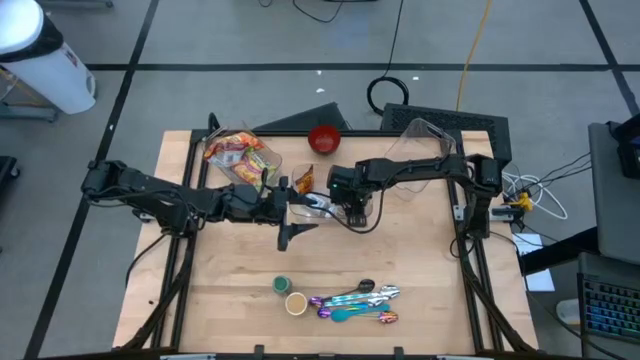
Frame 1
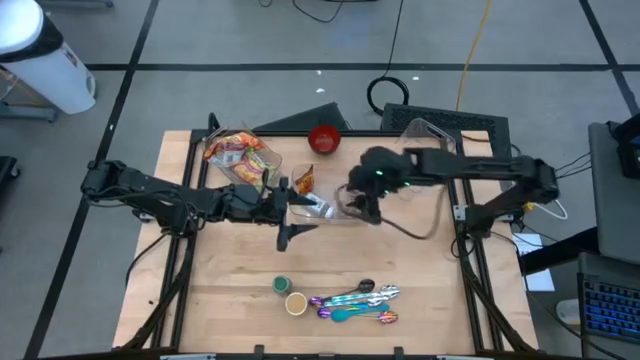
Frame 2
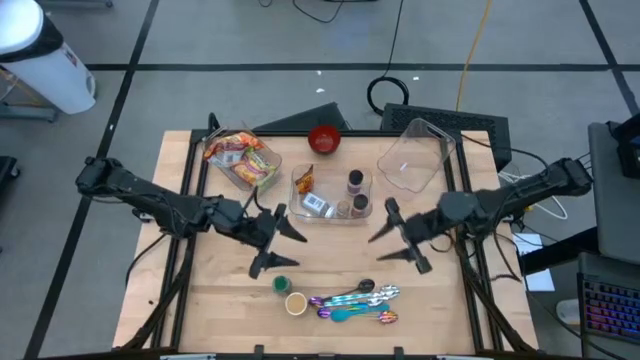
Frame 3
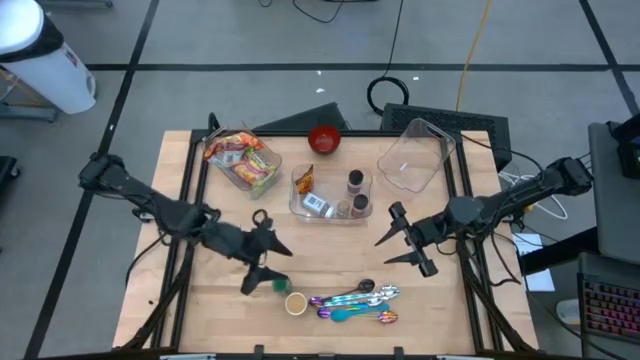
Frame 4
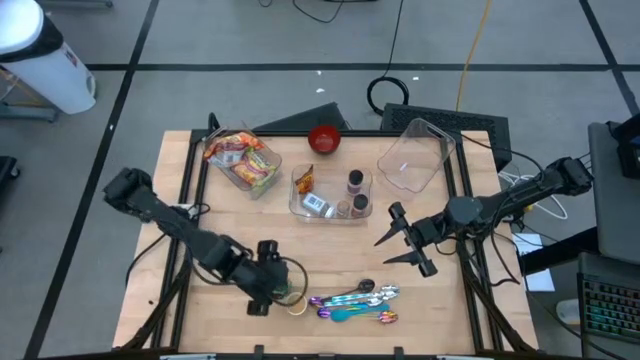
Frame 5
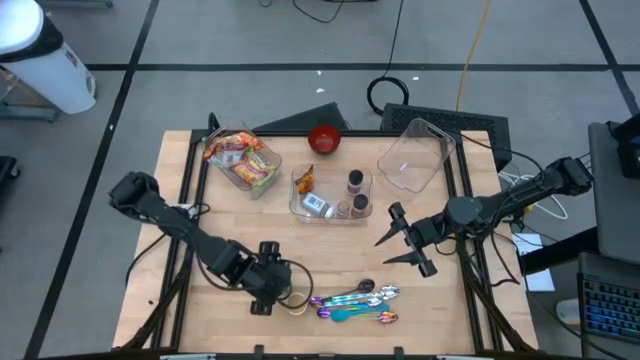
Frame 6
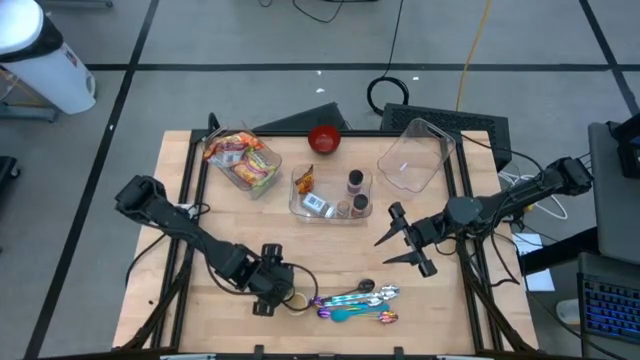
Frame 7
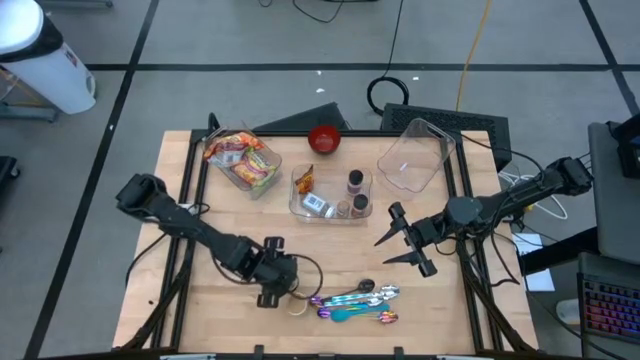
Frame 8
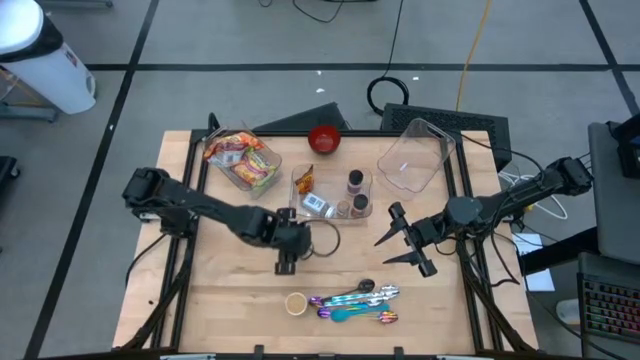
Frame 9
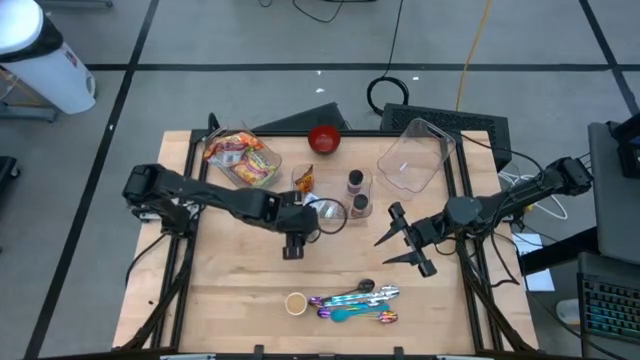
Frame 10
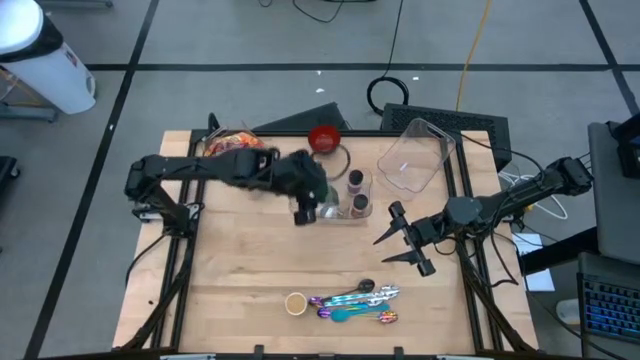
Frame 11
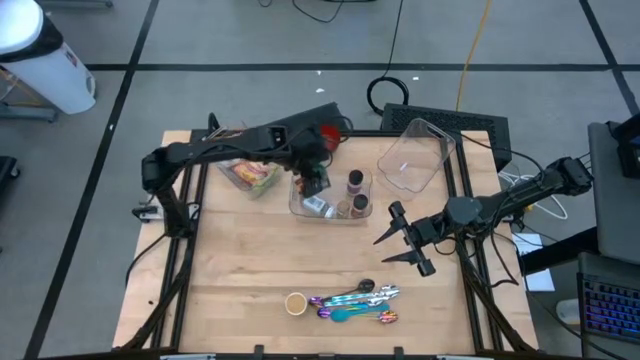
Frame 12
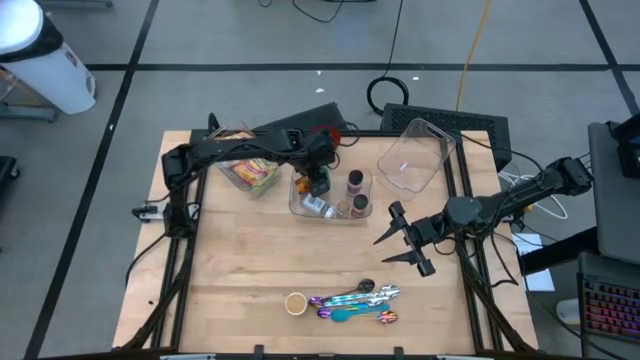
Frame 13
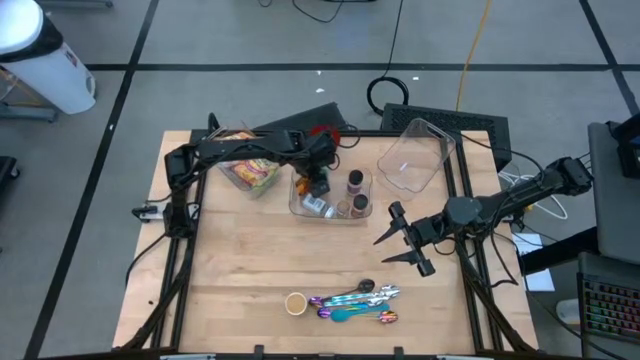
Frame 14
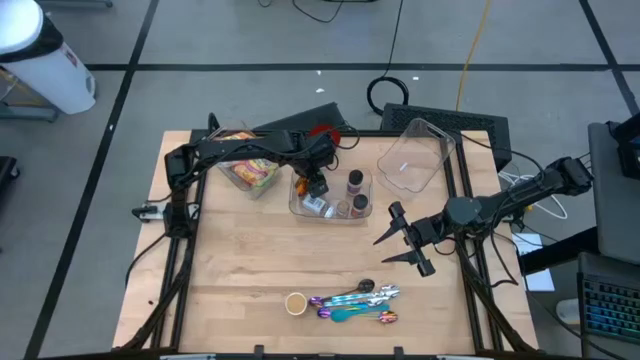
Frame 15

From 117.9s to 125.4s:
Task: Pick & Place Food Item
Put the green seasoning bottle into the center transparent bin

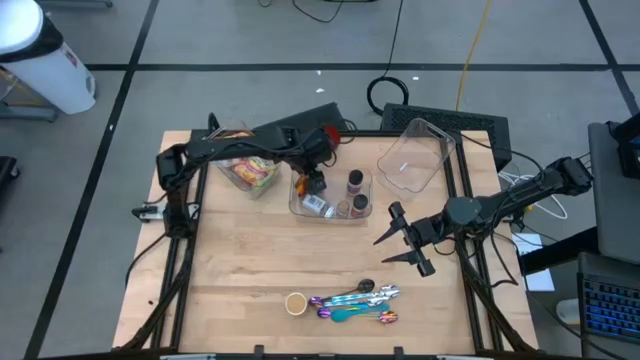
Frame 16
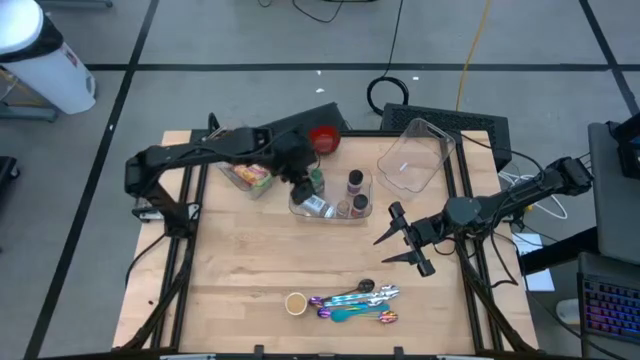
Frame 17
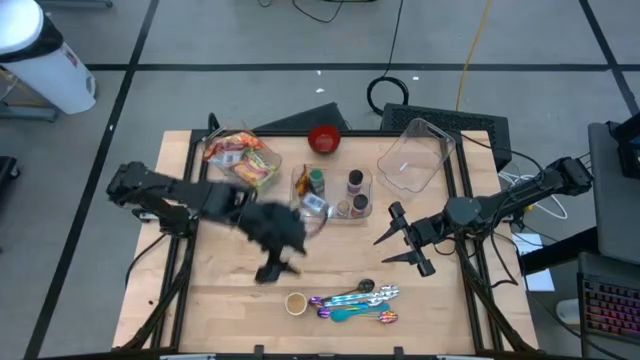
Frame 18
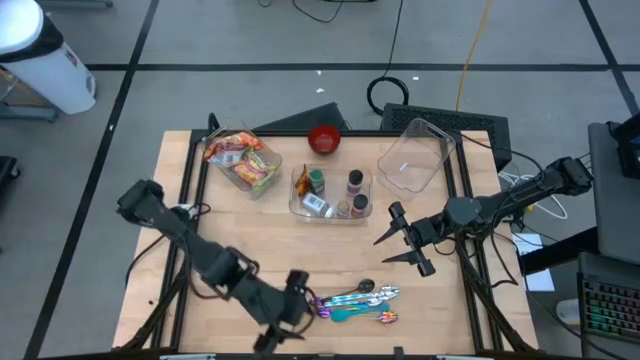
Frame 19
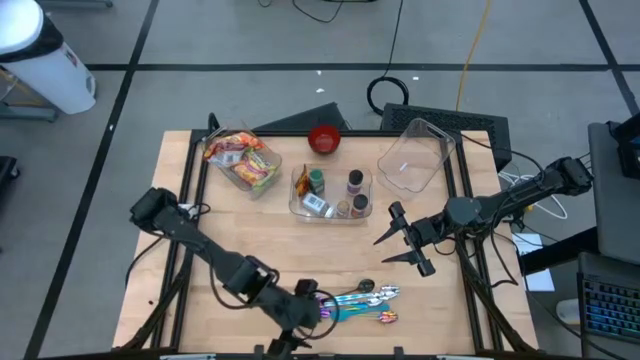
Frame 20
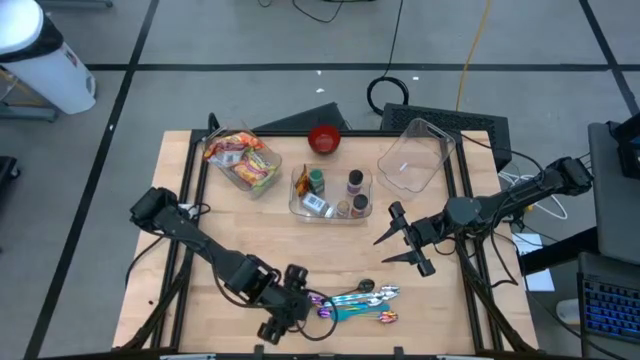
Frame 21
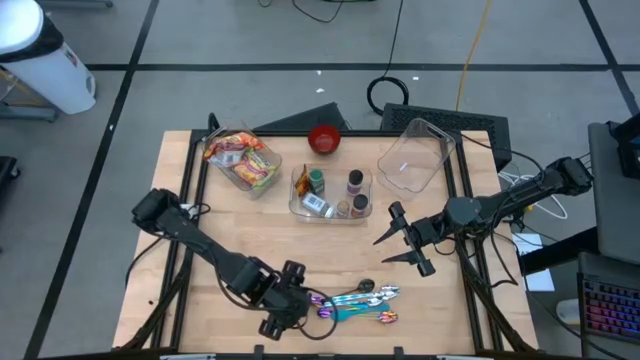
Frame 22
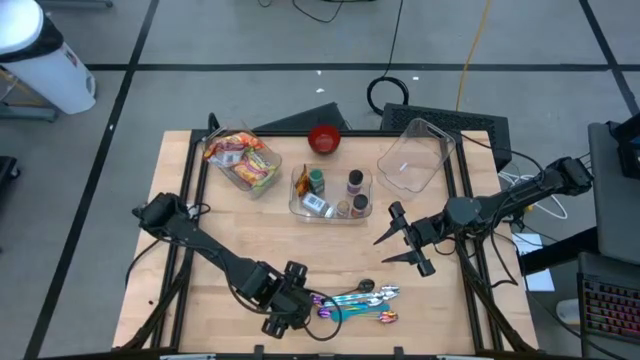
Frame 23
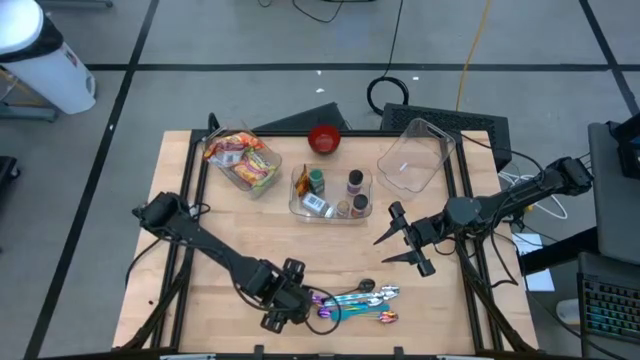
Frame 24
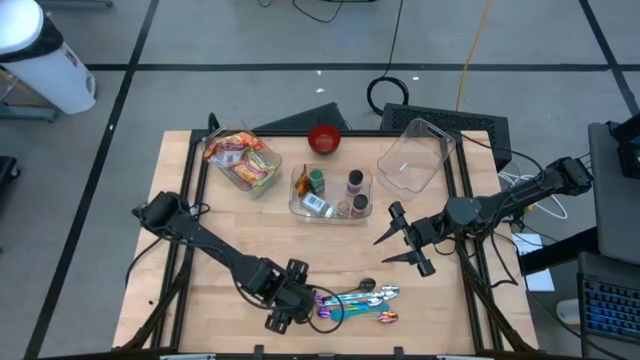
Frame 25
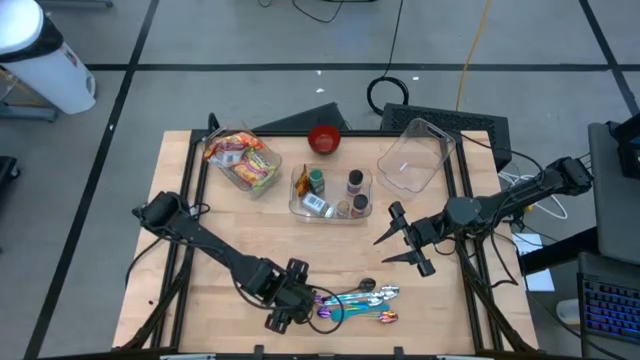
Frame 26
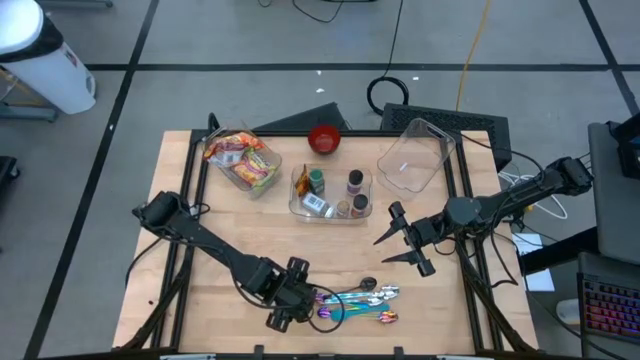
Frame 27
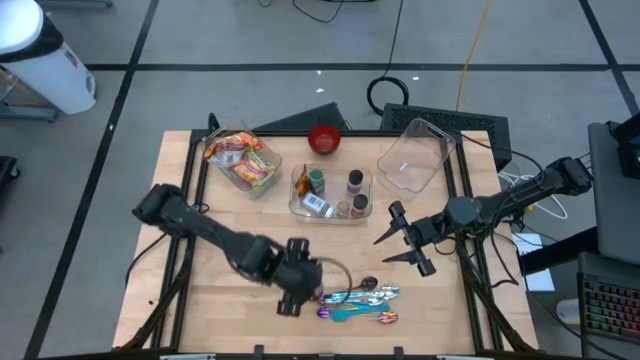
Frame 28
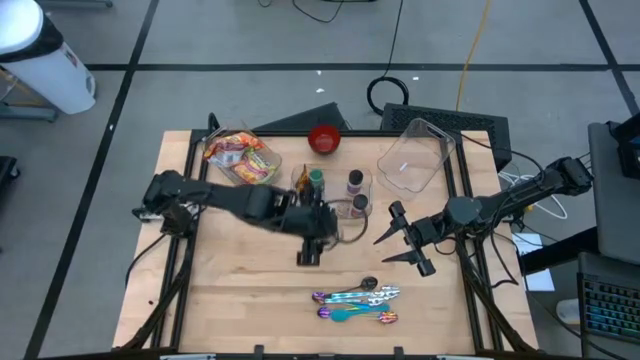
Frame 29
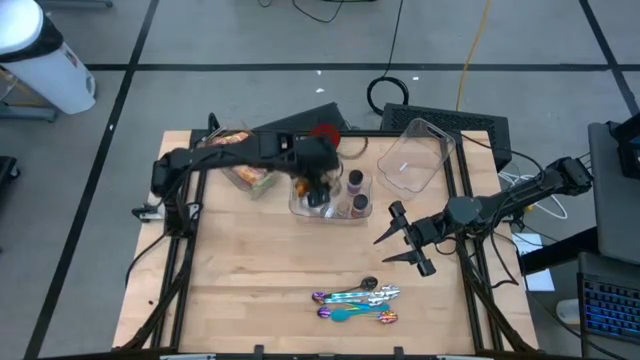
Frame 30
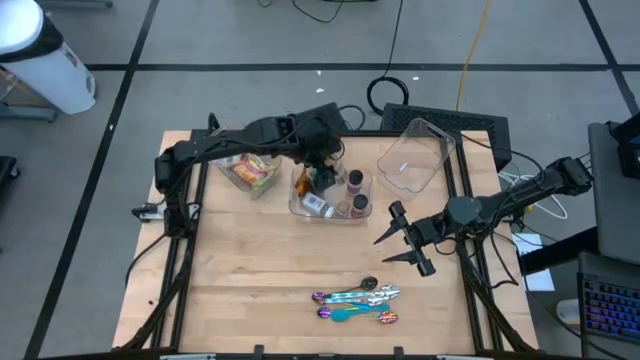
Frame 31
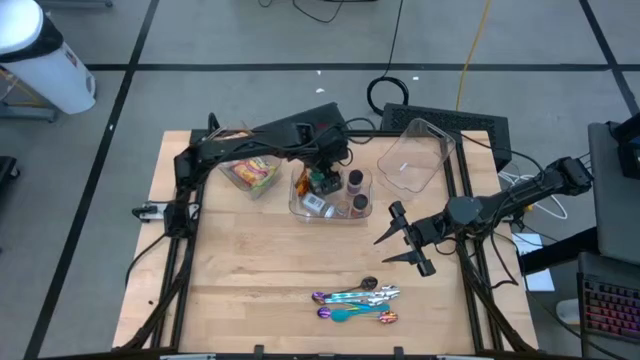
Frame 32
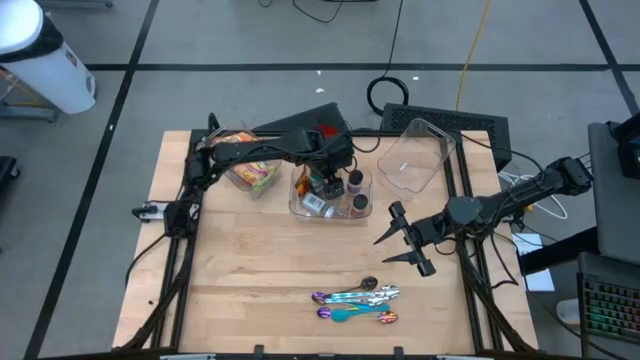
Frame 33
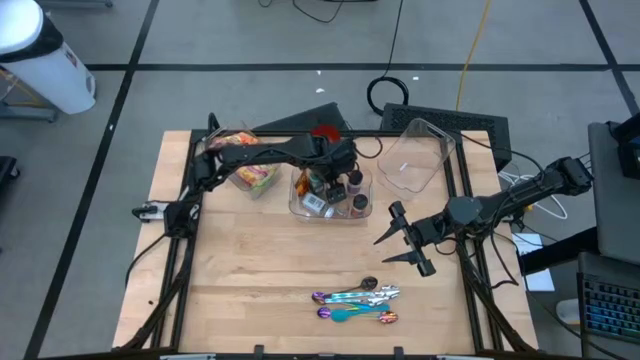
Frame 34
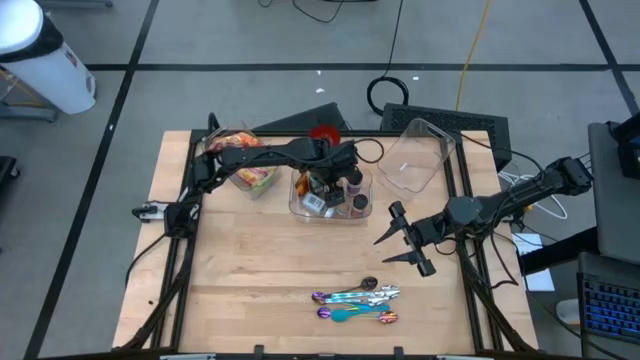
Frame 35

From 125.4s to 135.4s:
Put the gold seasoning bottle into the center transparent bin

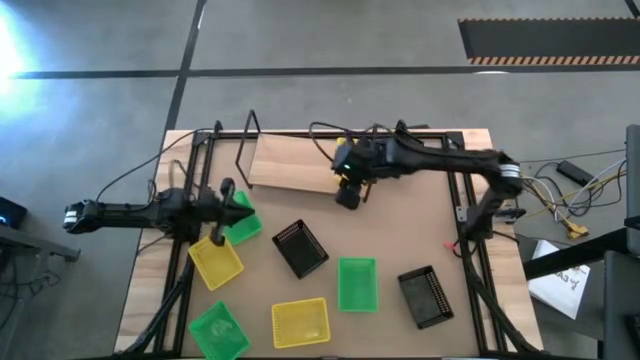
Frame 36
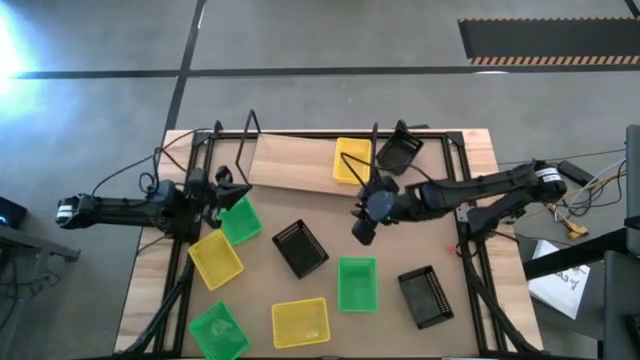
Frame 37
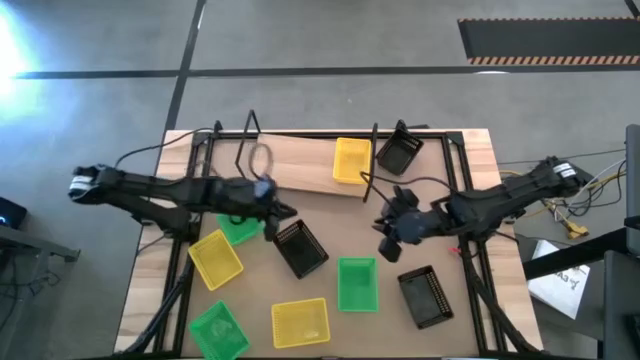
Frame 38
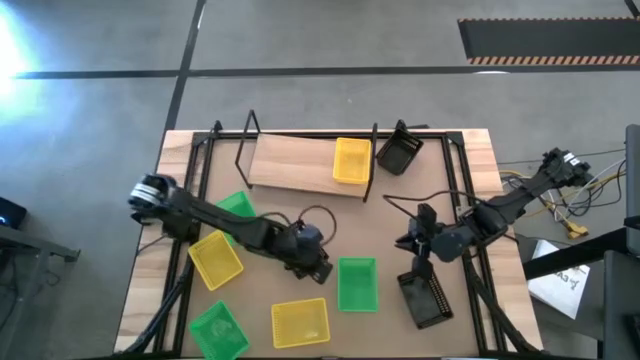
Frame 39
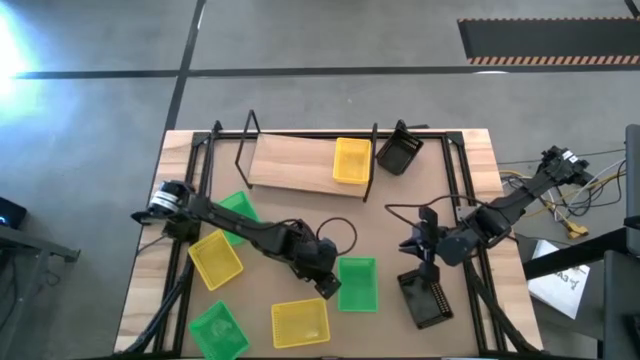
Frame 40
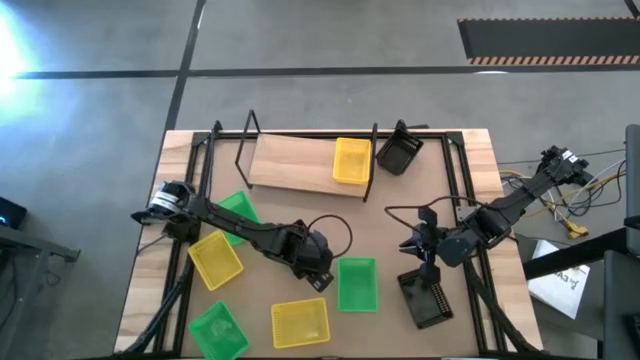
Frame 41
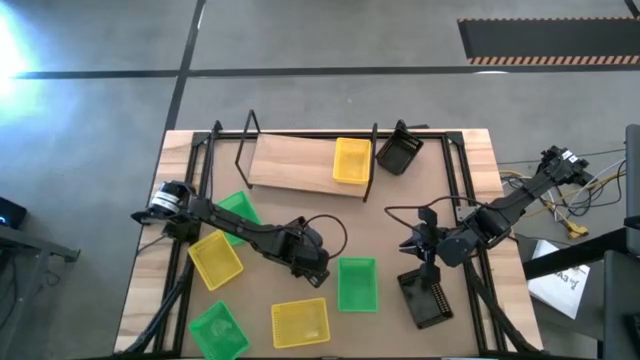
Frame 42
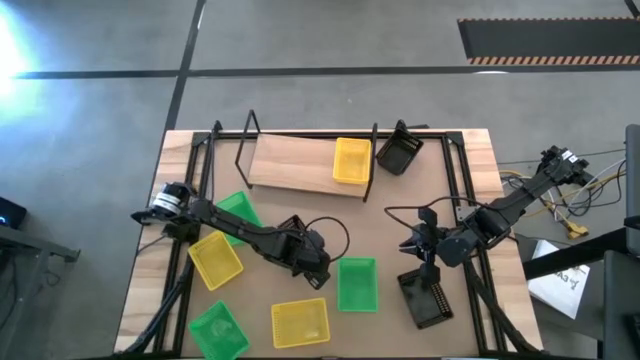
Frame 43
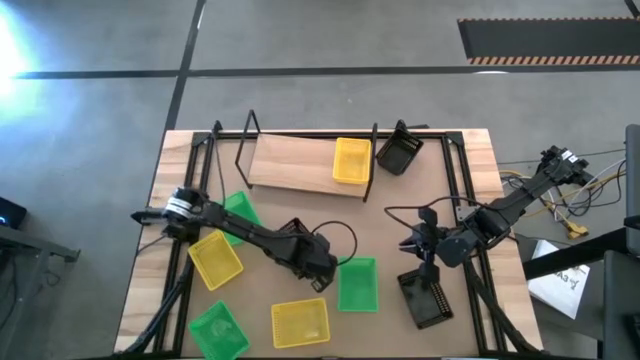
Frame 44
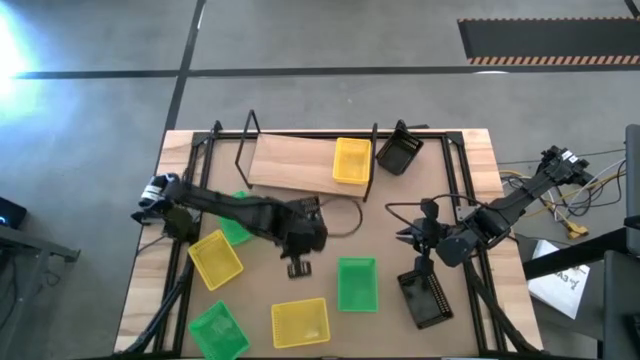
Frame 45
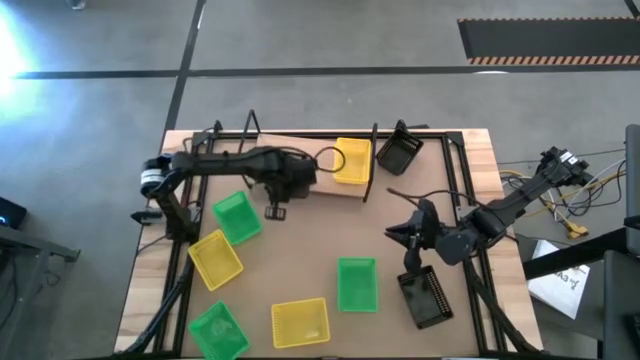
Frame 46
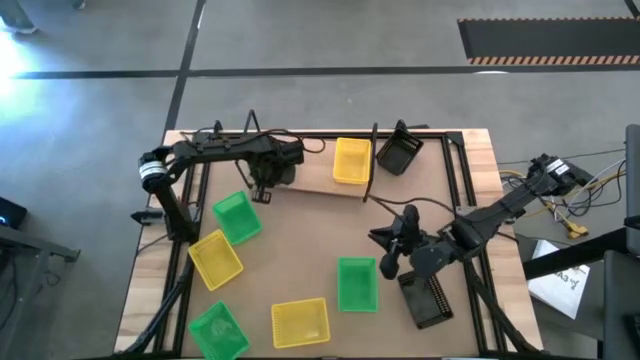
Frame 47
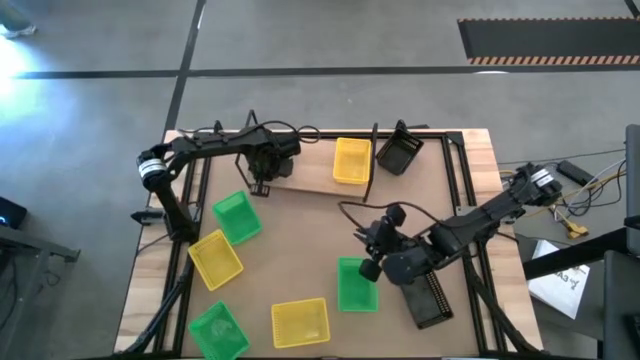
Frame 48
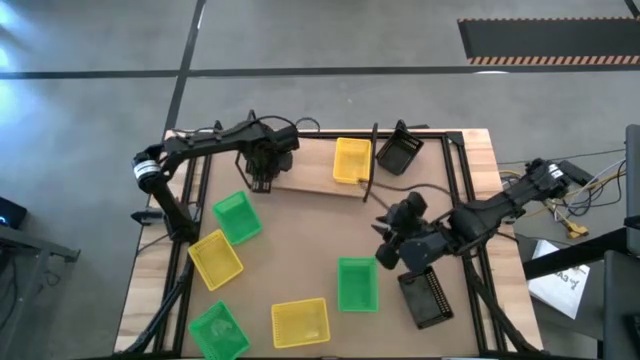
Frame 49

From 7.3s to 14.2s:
Task: Stack baskets on shelf by color
Put the left black basket on the shelf
